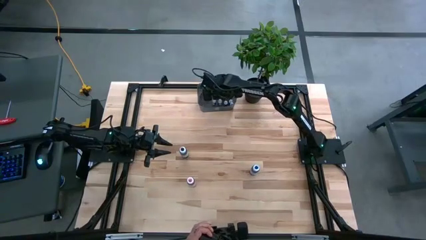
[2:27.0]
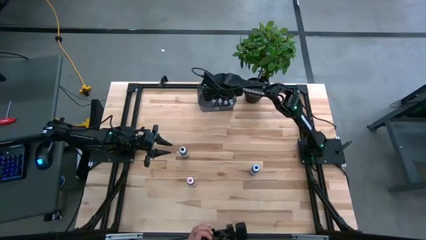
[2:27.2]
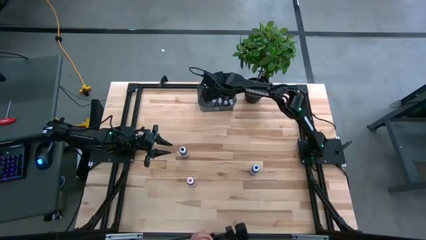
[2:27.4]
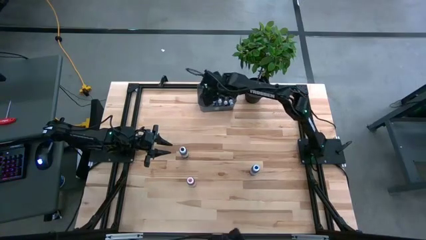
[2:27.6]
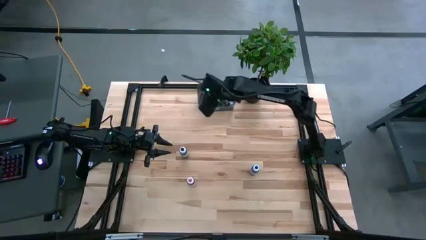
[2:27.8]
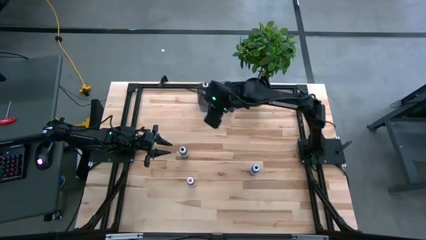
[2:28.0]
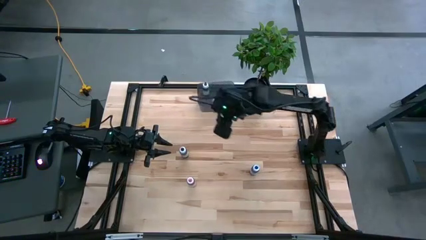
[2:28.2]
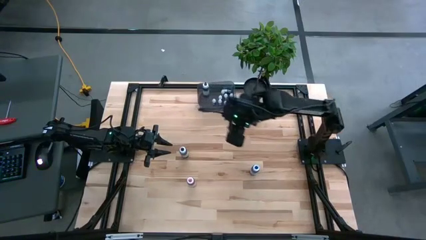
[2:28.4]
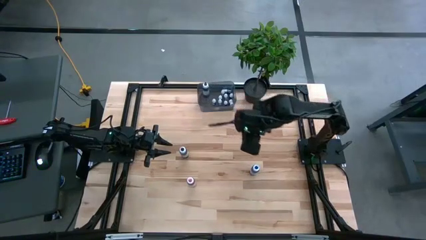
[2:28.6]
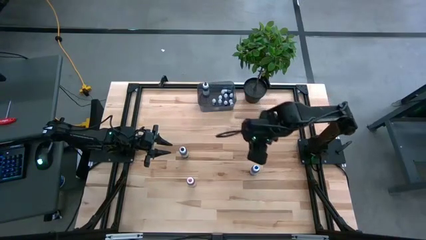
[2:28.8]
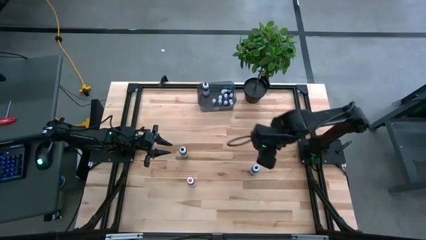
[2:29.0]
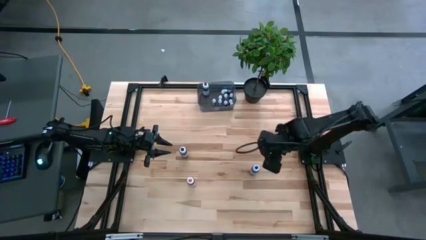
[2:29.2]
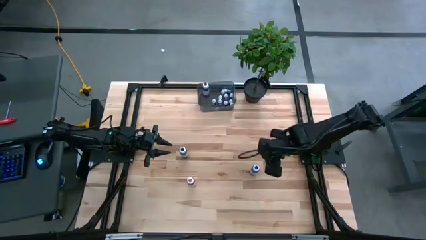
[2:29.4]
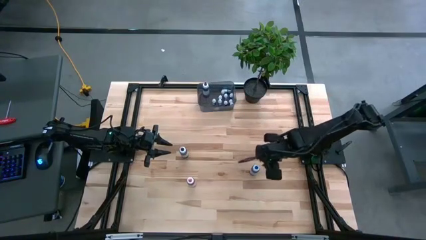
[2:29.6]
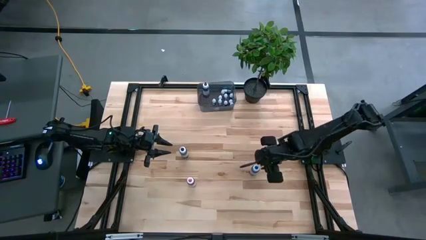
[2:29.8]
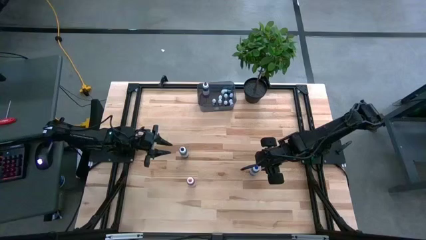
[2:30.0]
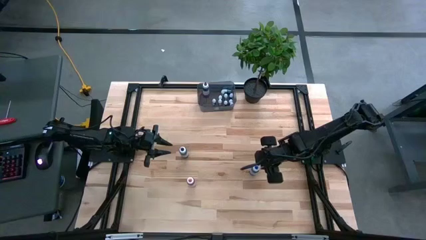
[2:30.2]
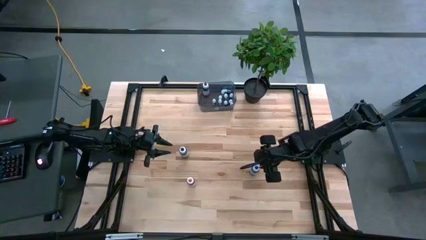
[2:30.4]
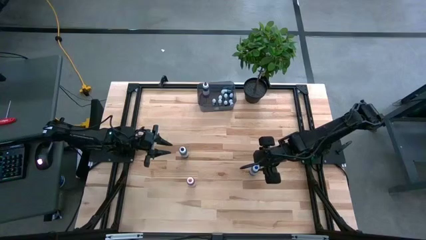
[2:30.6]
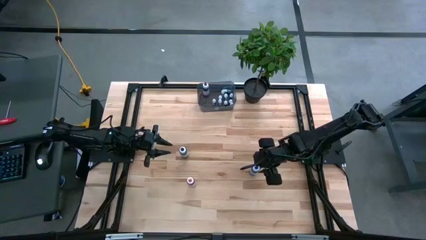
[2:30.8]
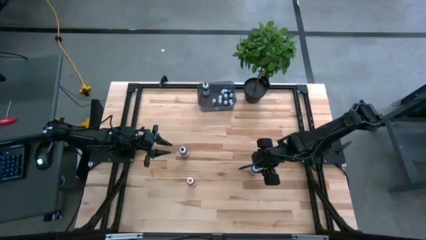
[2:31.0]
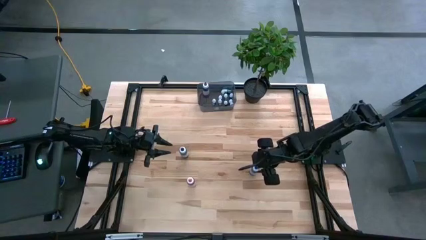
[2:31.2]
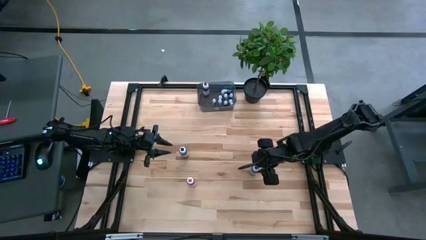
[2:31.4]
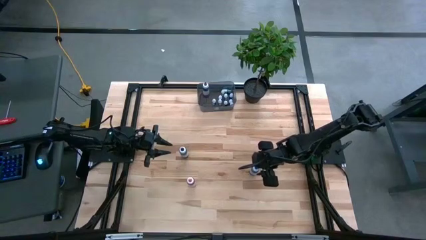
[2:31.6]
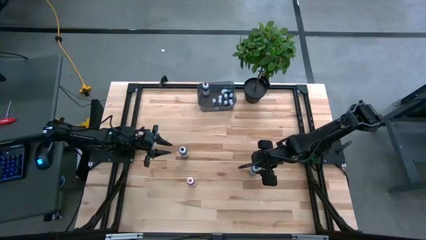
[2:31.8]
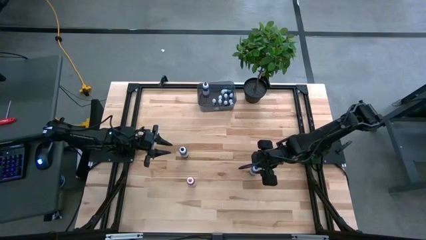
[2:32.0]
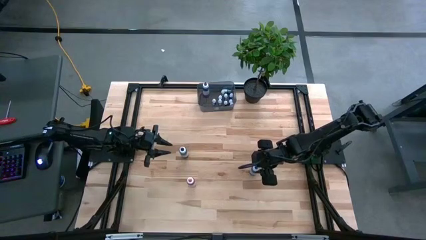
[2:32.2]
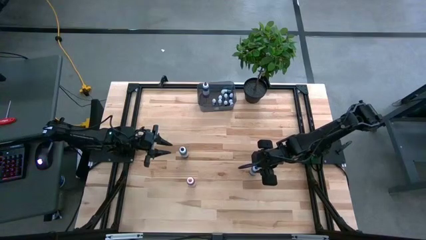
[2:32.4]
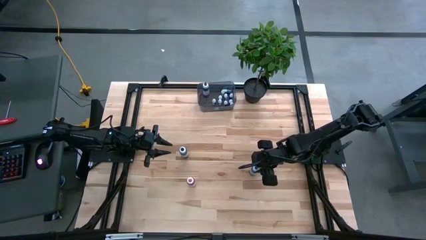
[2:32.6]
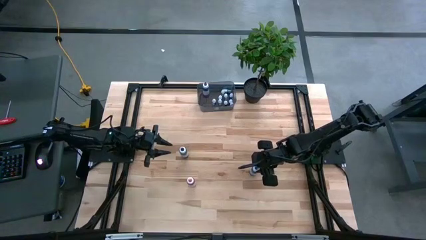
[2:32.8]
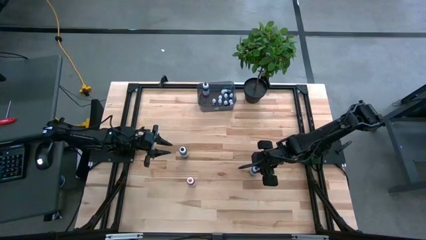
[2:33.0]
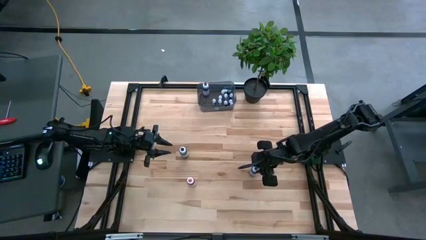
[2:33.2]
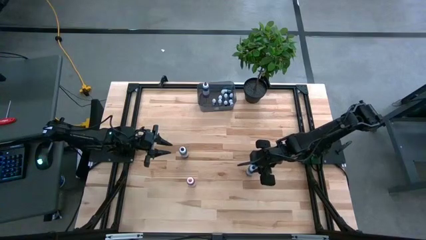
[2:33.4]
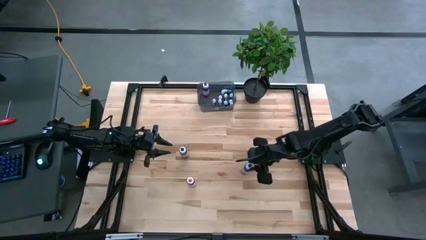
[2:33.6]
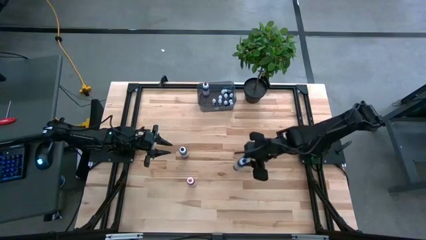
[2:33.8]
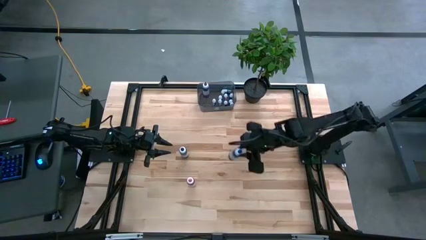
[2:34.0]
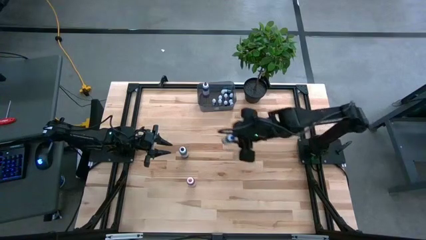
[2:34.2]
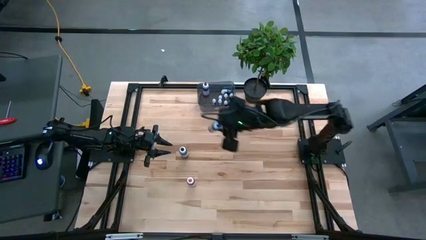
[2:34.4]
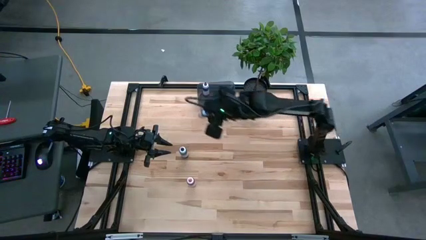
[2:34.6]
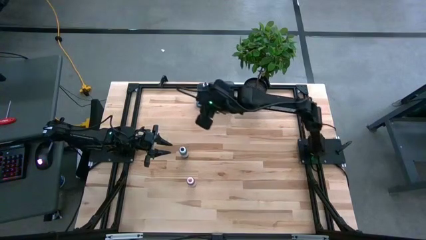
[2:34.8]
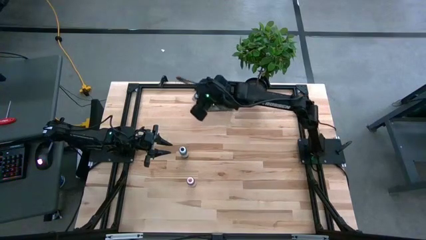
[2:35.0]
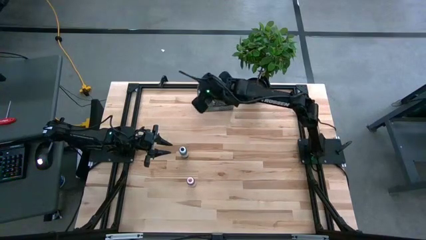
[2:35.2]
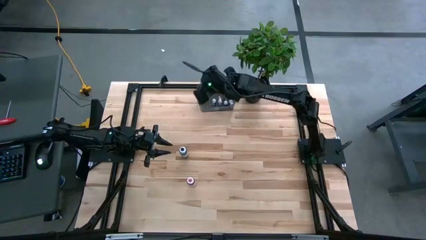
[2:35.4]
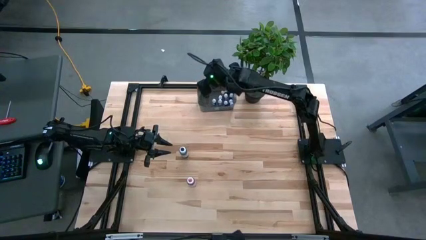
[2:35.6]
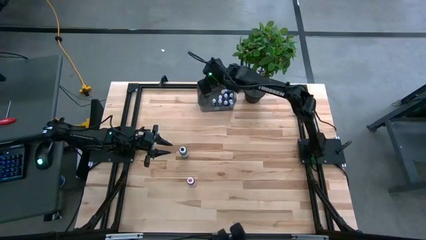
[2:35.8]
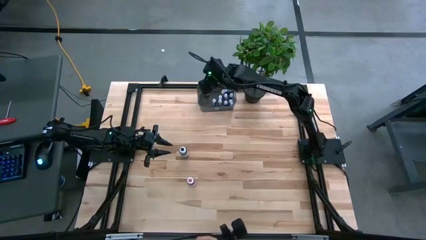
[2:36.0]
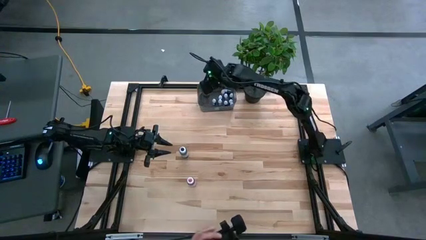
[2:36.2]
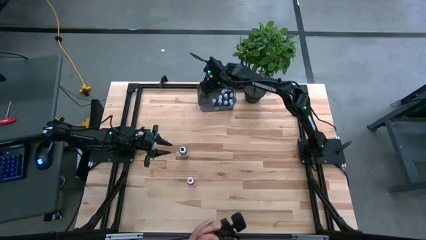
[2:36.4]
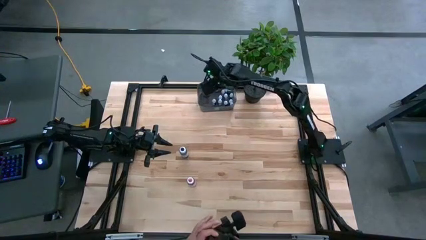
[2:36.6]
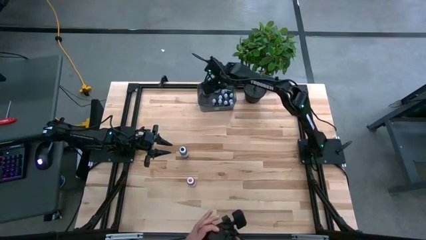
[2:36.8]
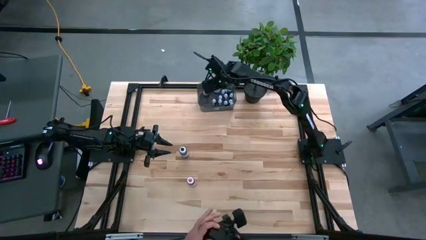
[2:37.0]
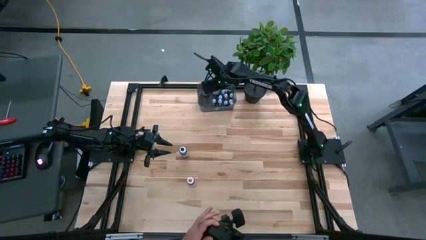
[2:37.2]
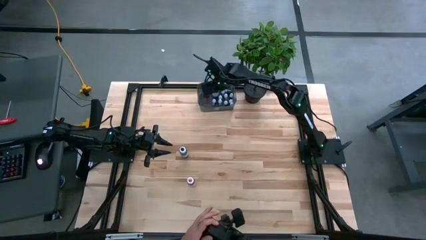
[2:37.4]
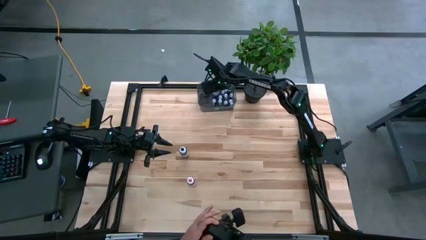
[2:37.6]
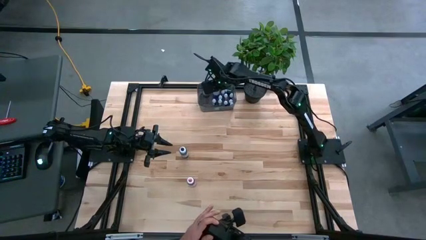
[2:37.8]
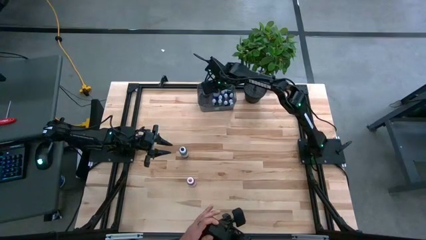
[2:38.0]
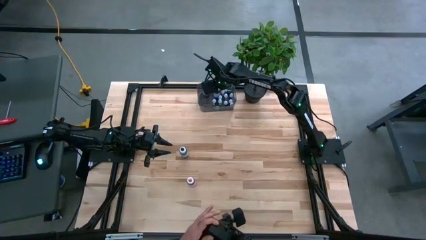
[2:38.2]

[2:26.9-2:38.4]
Task: Pick & Place food coloring
Put the large blue food coloring bottle into the black bin
